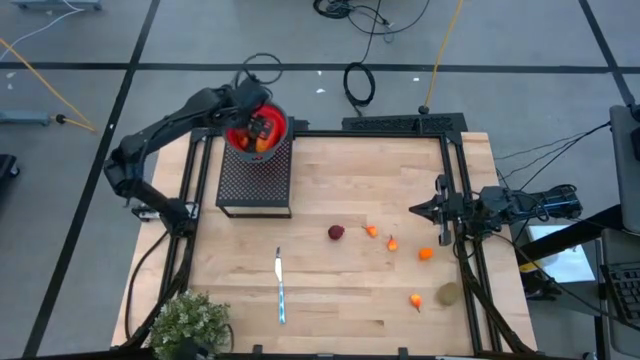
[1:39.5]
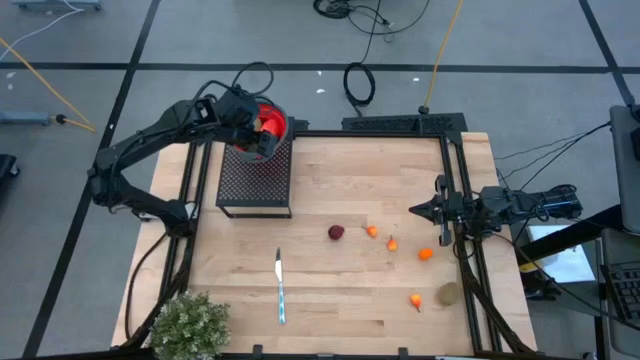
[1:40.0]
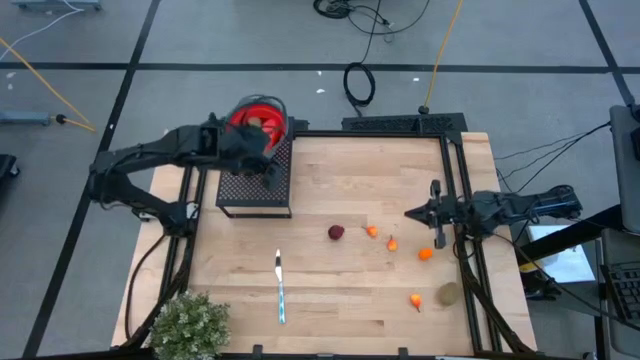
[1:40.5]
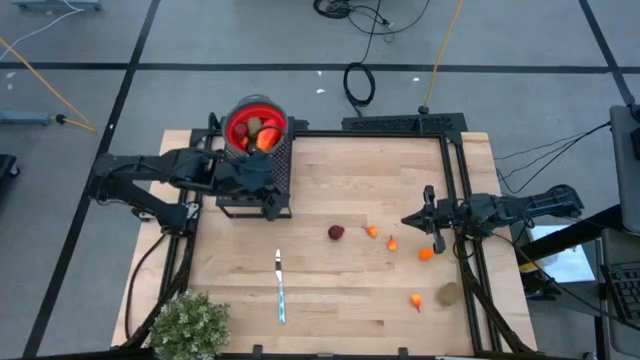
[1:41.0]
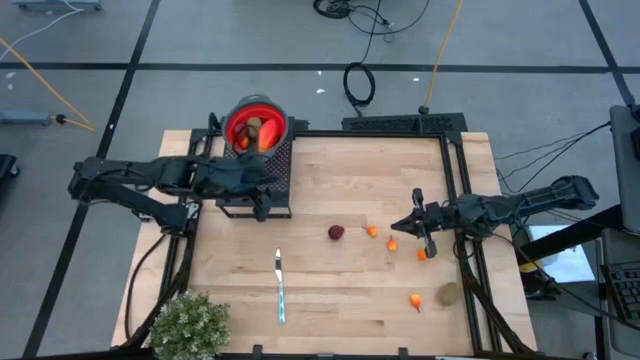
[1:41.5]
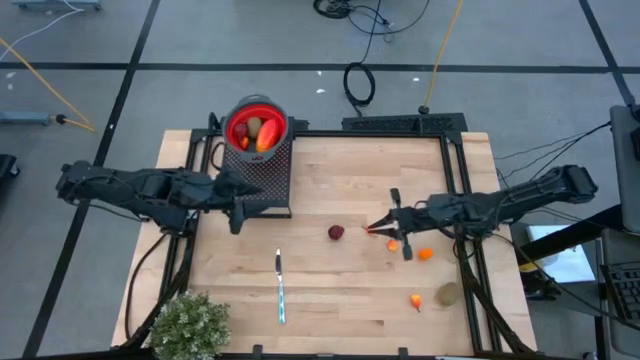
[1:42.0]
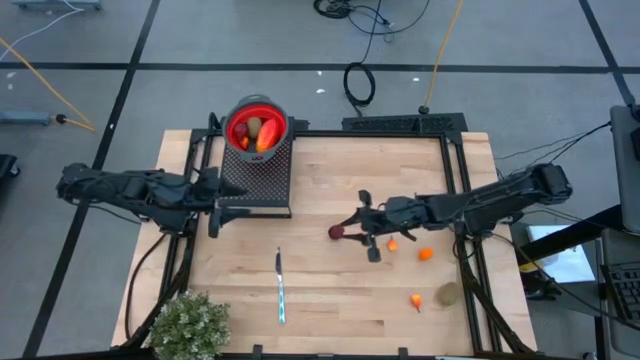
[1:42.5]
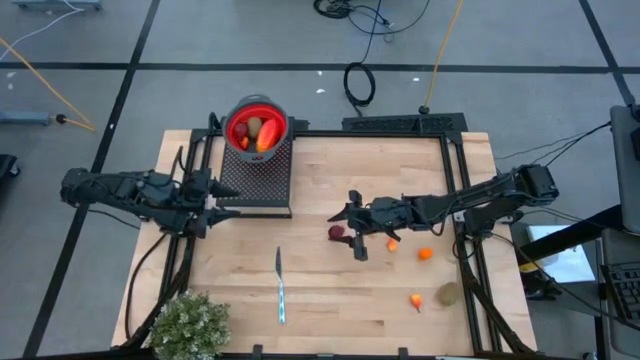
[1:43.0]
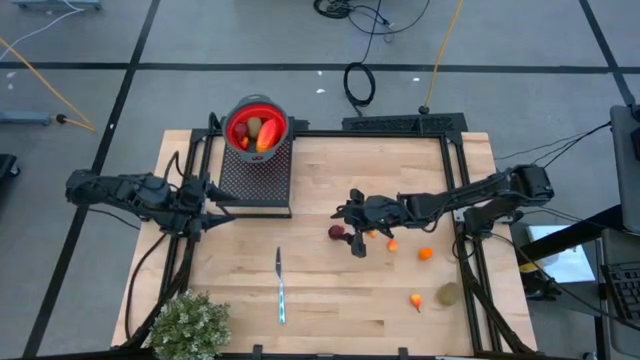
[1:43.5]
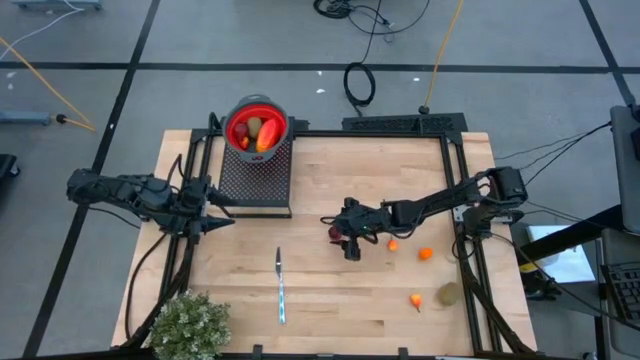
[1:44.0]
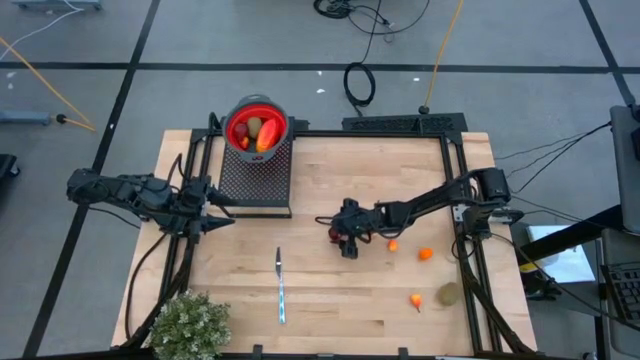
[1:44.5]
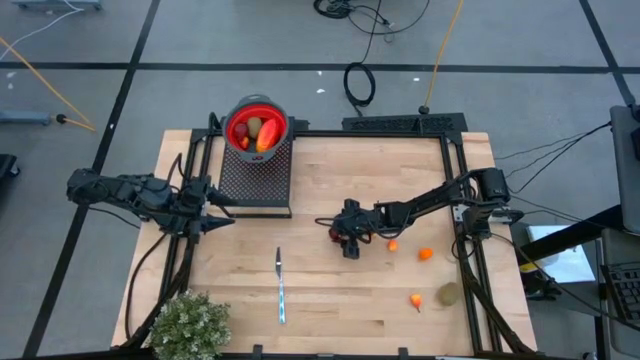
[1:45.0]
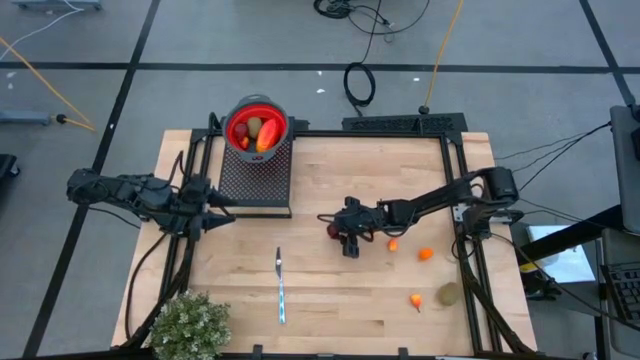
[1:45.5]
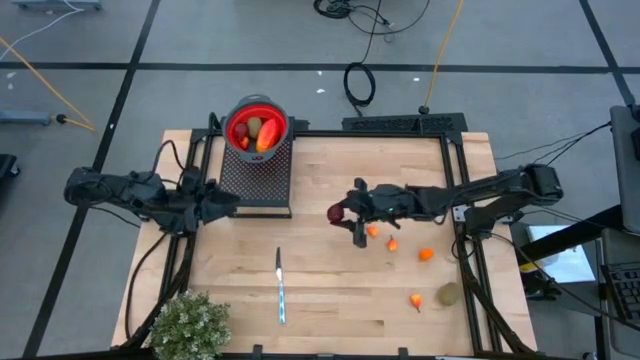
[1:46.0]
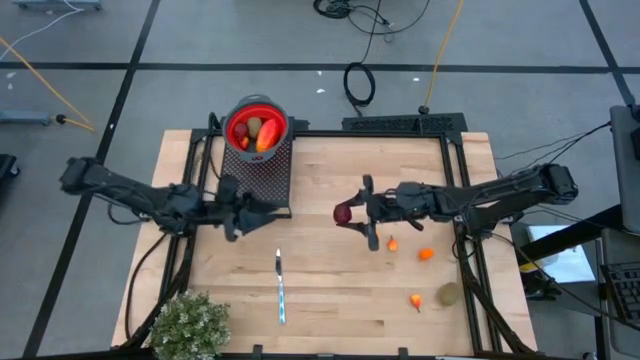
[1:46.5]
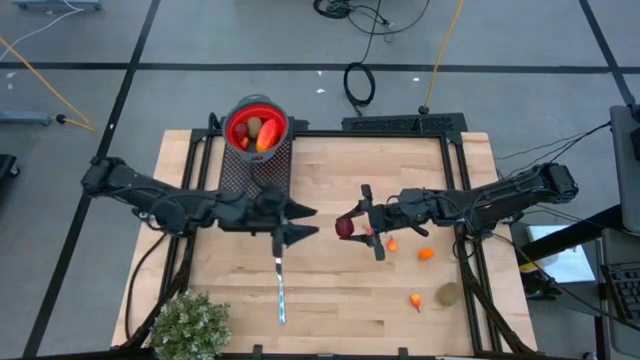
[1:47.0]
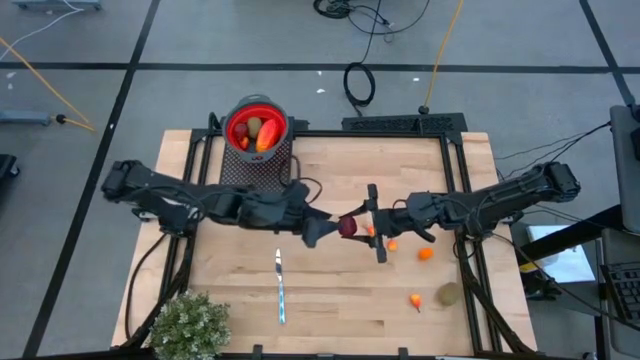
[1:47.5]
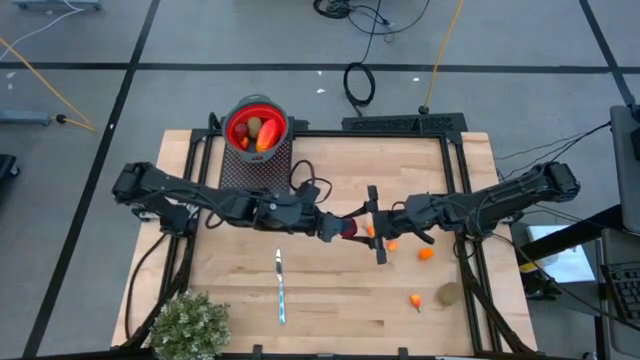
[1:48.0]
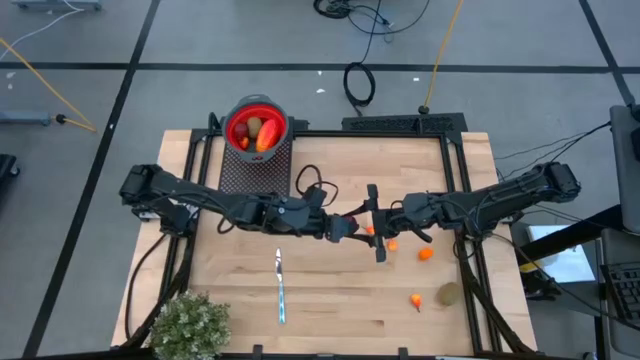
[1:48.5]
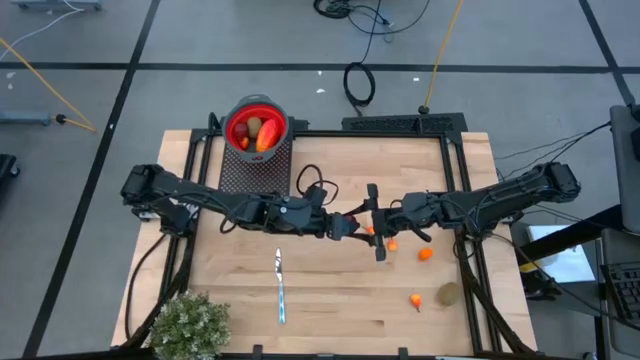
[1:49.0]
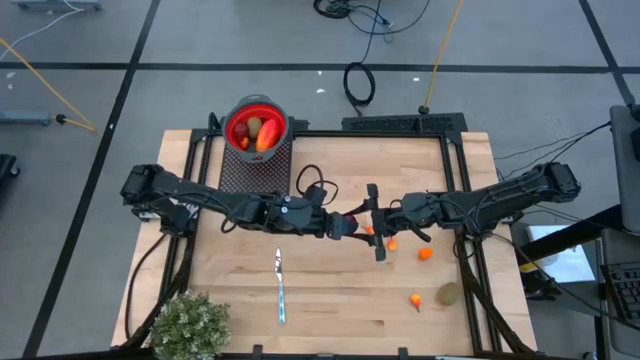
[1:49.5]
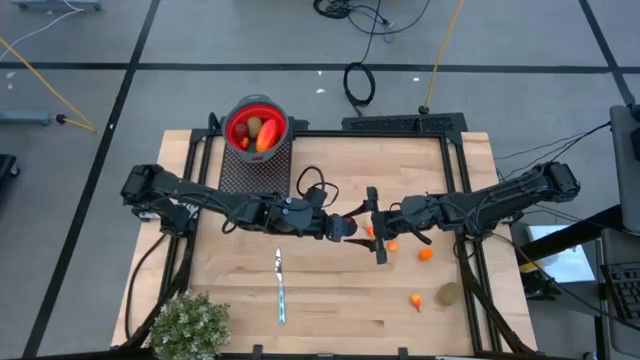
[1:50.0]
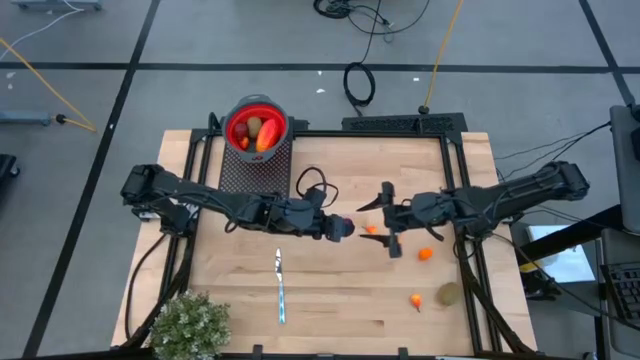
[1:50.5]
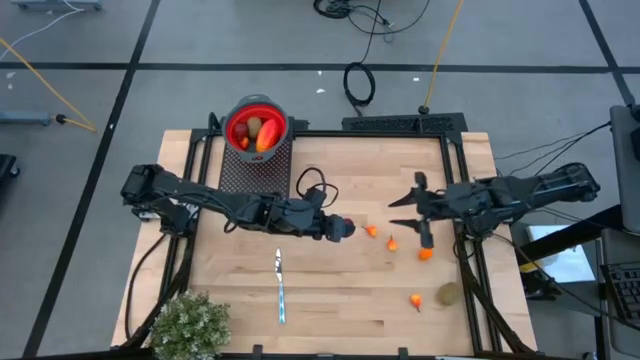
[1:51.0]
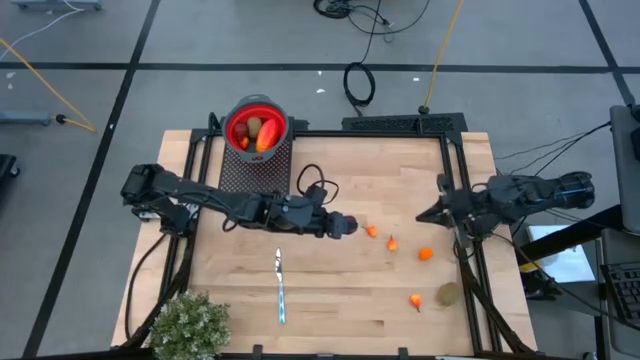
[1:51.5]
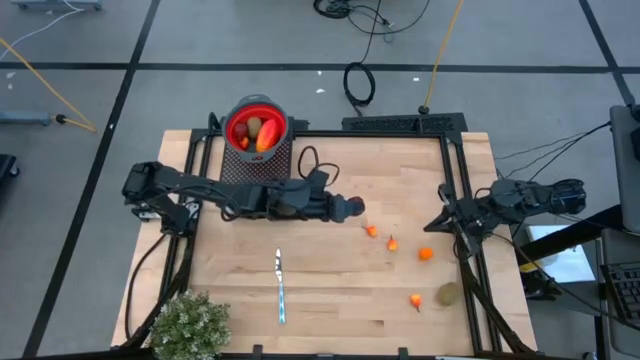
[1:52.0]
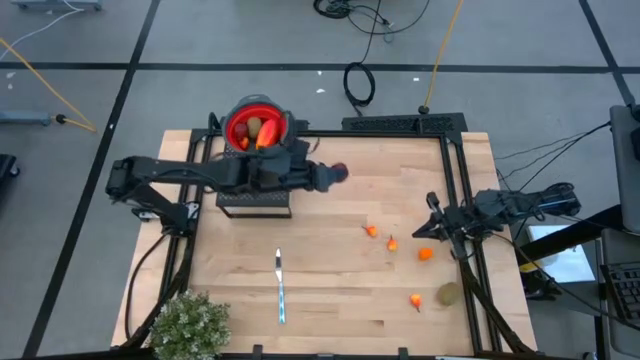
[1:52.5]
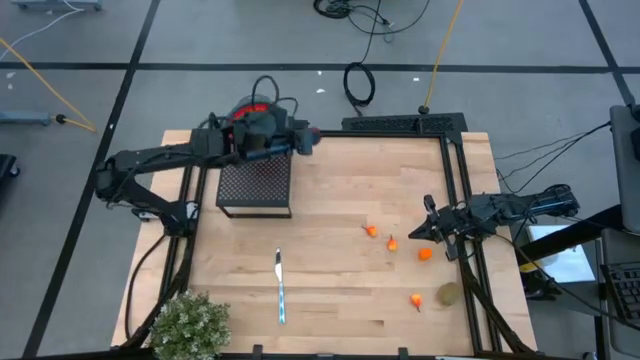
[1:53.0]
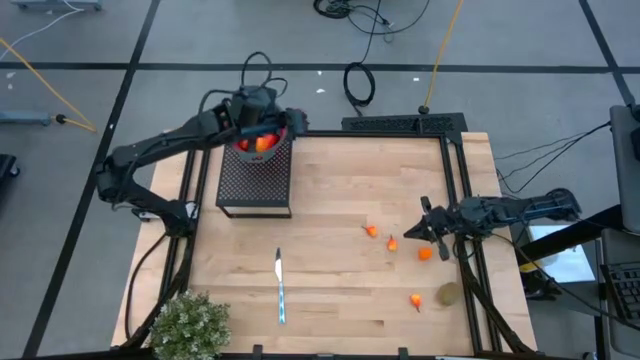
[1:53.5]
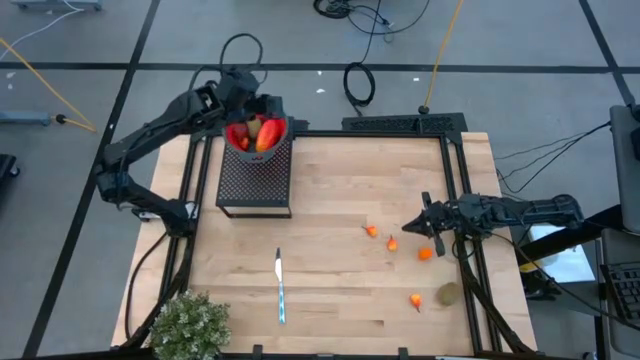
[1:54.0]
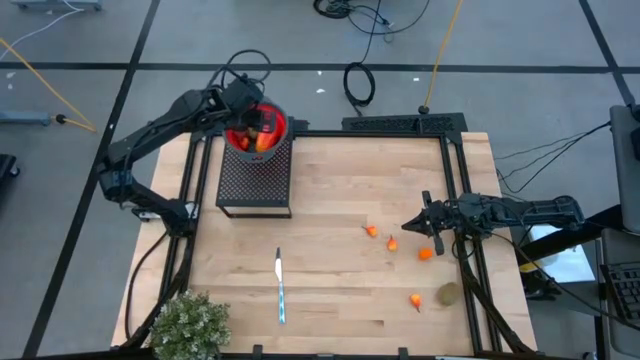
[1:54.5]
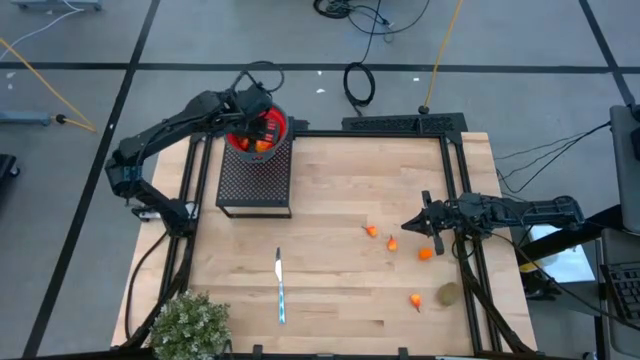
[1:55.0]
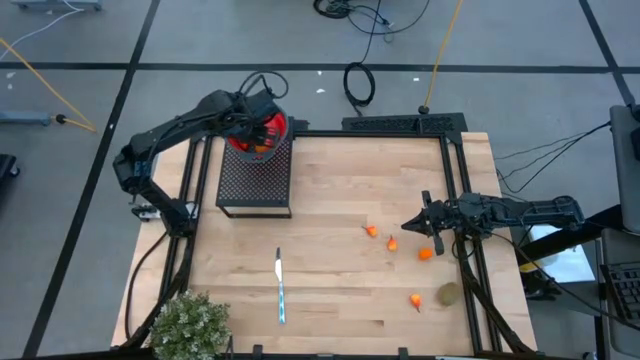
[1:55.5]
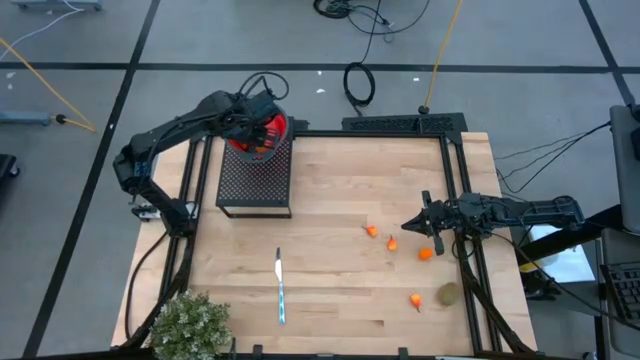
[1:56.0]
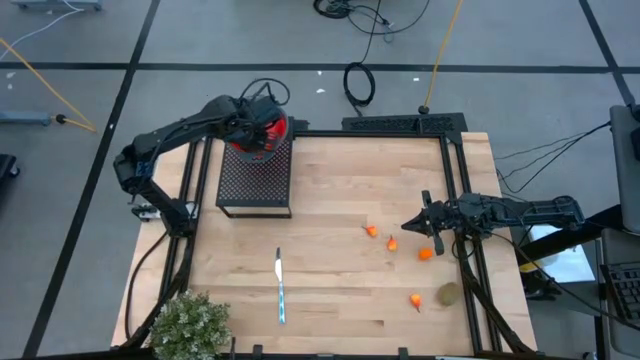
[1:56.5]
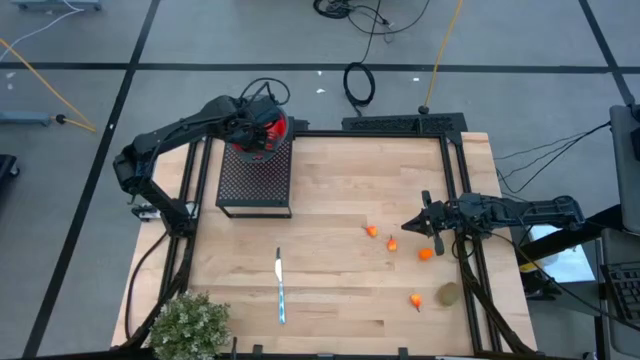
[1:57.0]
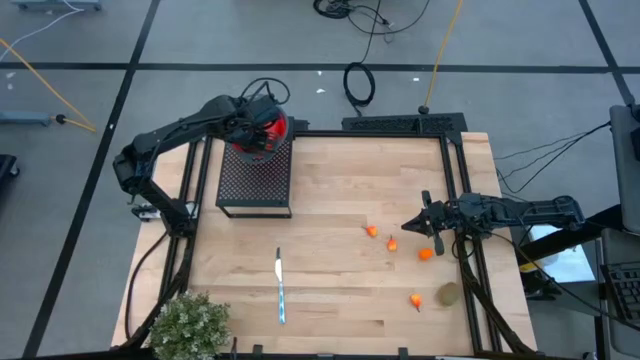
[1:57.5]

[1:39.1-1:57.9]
Task: Pick & Place Fruit
Put the pomegranate into the red strainer bowl on the shelf

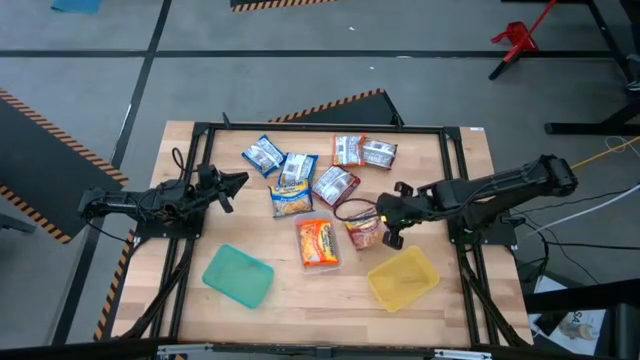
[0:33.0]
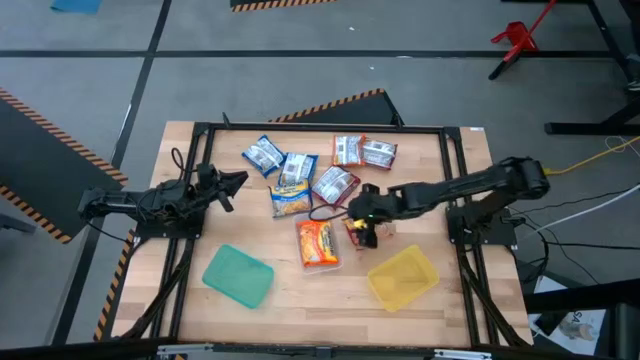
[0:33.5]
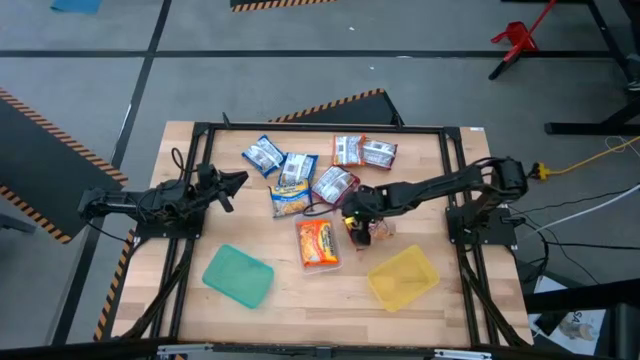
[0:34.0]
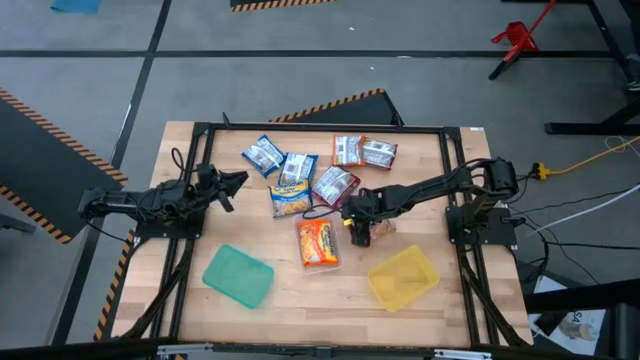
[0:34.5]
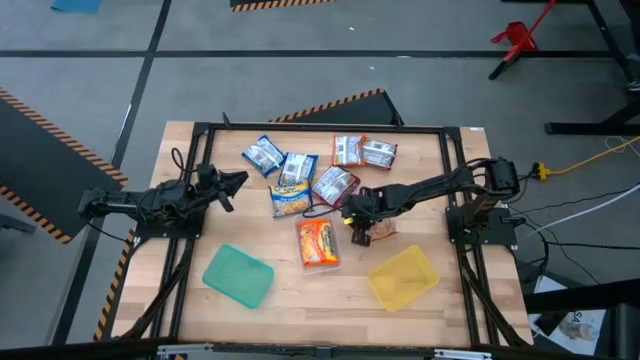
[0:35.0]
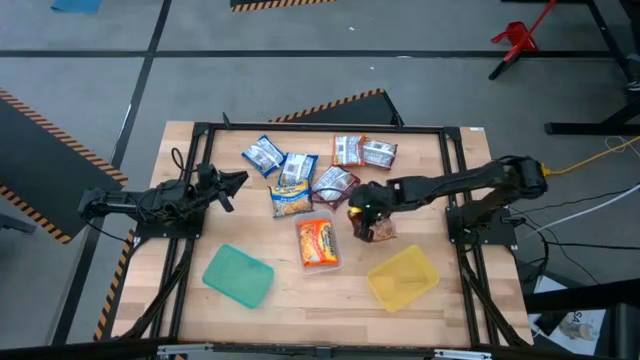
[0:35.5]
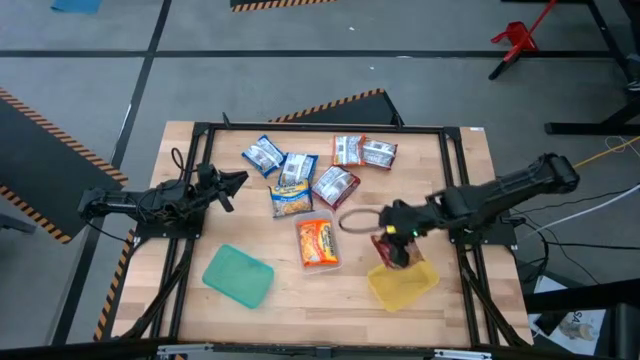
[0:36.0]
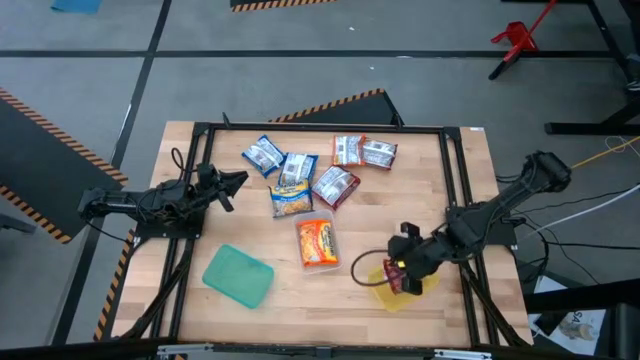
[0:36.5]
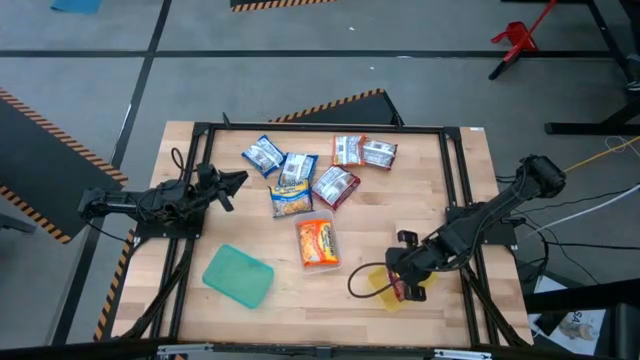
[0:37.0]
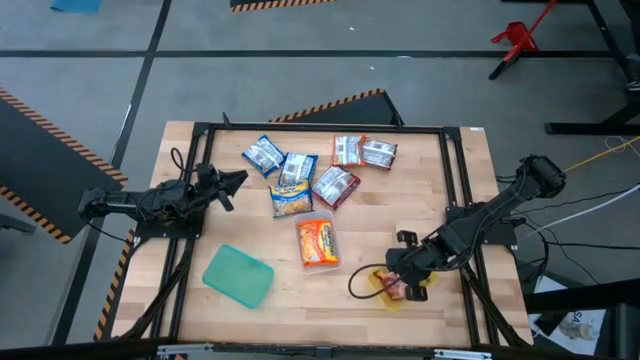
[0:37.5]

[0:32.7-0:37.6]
Task: Sort Maruchan noodles
Put the bottom right red noodle pack into the yellow bin
